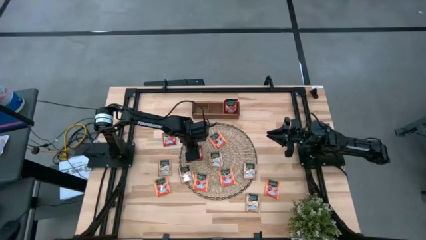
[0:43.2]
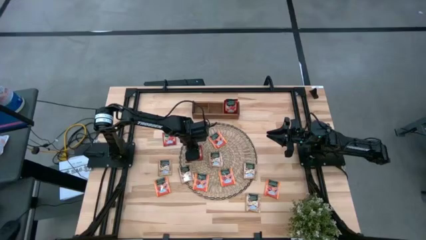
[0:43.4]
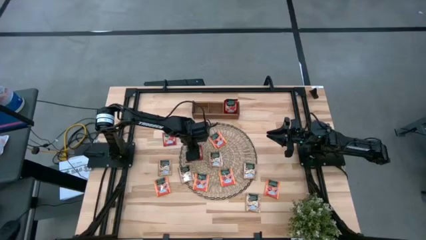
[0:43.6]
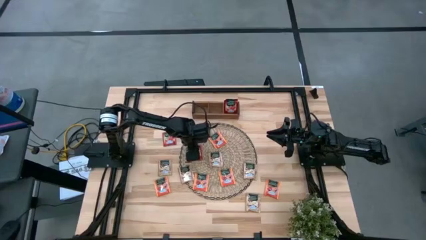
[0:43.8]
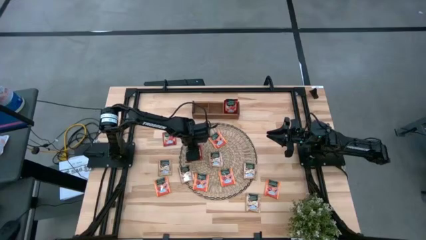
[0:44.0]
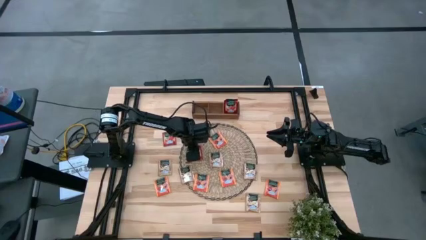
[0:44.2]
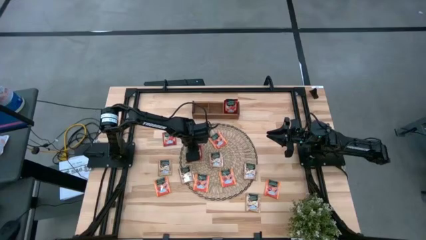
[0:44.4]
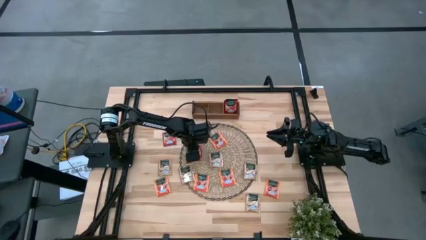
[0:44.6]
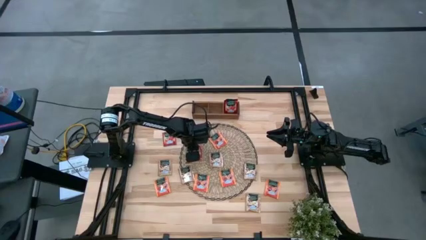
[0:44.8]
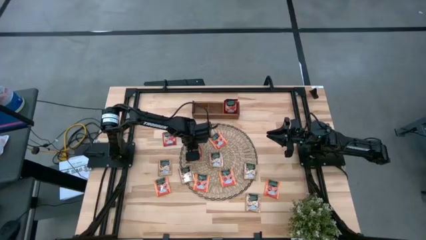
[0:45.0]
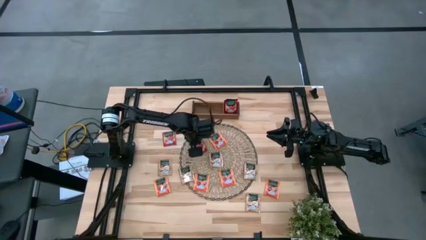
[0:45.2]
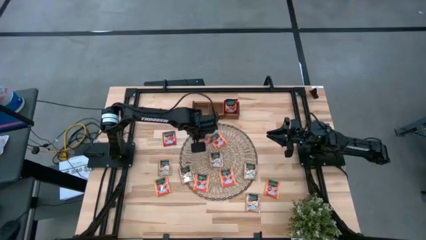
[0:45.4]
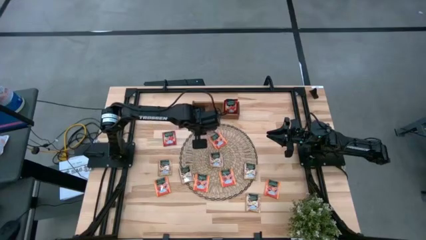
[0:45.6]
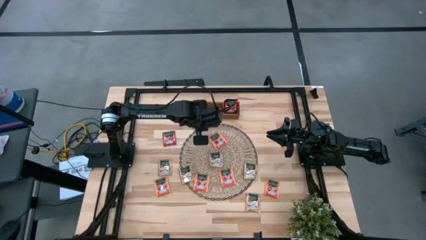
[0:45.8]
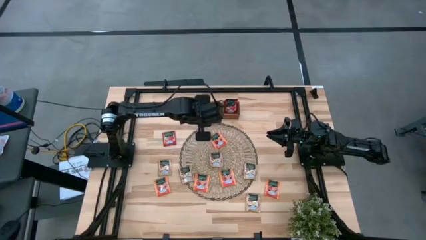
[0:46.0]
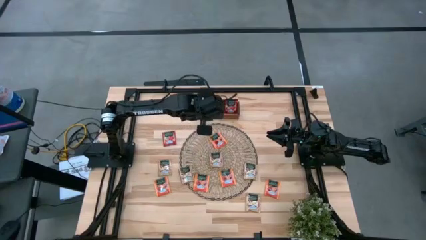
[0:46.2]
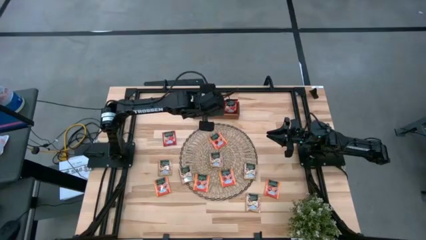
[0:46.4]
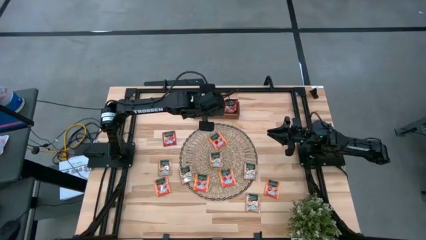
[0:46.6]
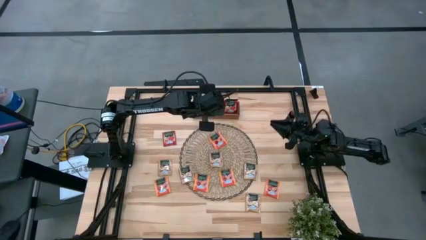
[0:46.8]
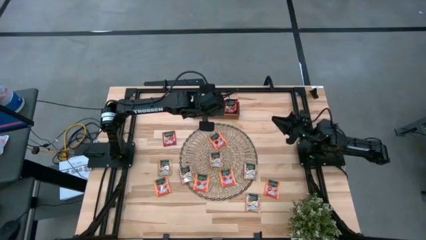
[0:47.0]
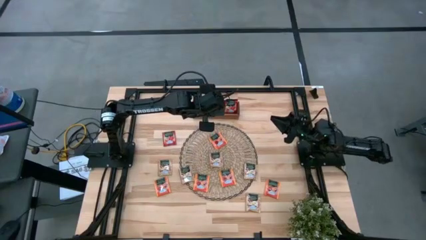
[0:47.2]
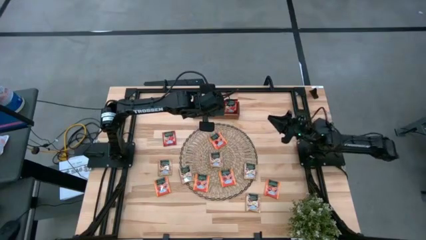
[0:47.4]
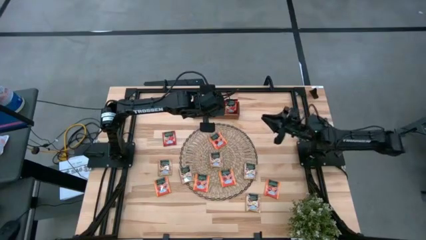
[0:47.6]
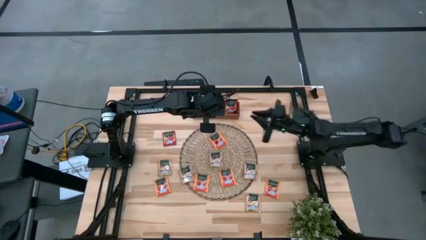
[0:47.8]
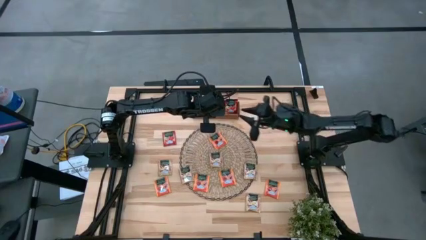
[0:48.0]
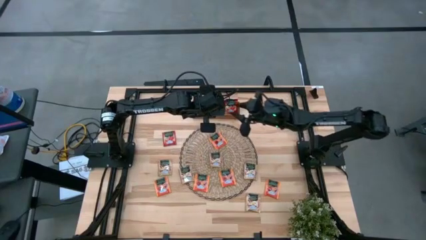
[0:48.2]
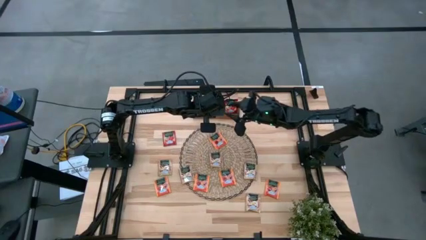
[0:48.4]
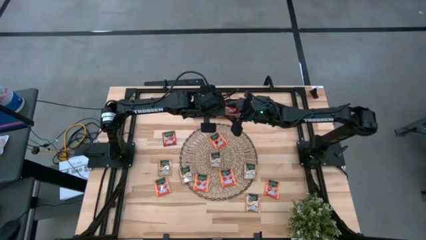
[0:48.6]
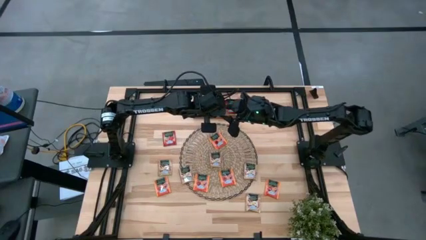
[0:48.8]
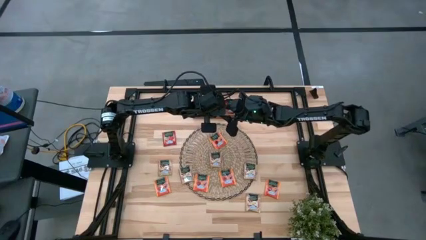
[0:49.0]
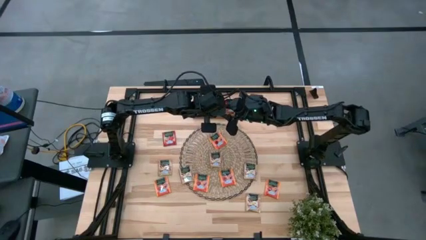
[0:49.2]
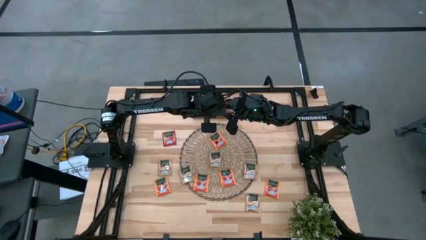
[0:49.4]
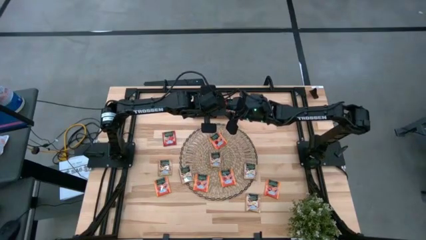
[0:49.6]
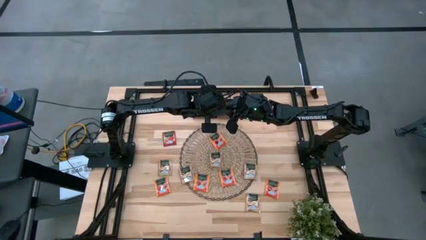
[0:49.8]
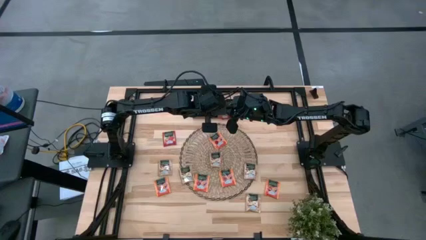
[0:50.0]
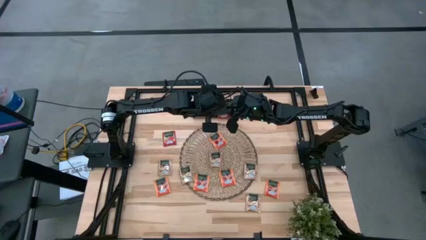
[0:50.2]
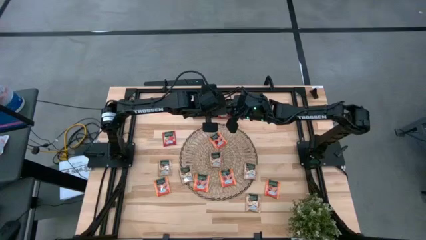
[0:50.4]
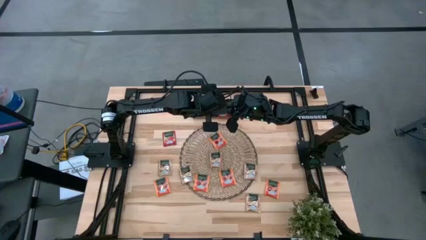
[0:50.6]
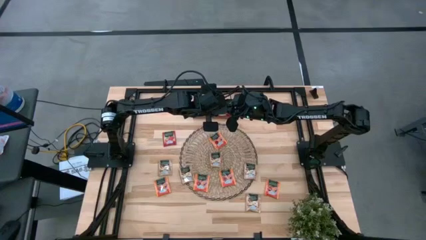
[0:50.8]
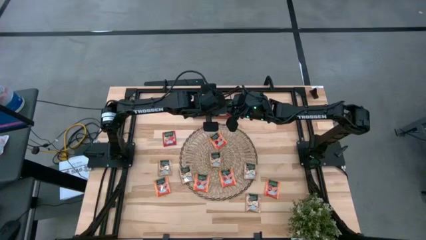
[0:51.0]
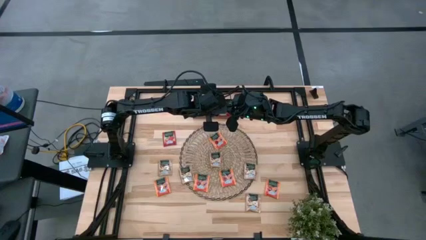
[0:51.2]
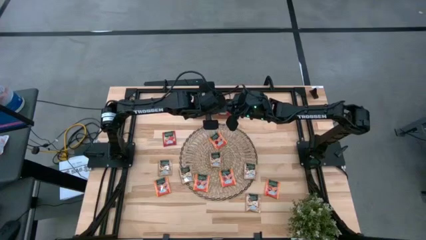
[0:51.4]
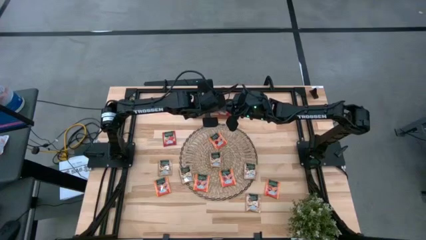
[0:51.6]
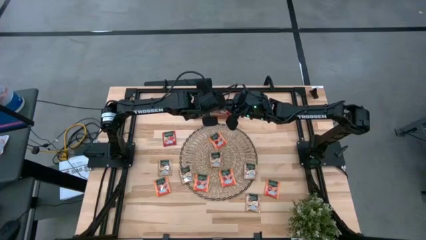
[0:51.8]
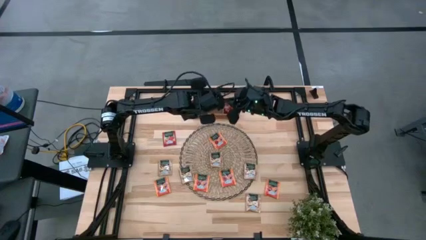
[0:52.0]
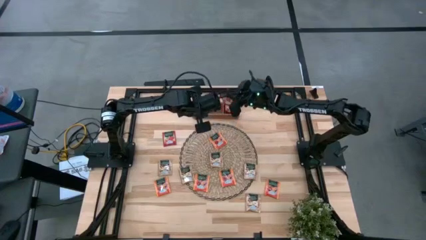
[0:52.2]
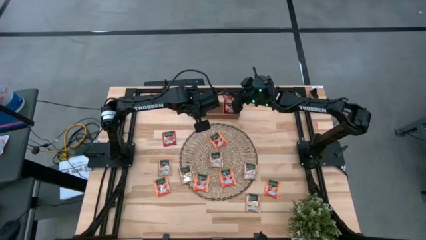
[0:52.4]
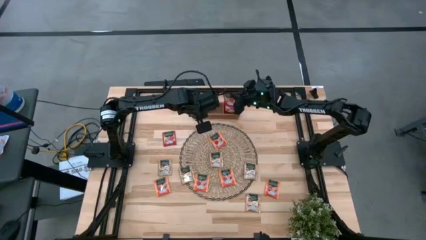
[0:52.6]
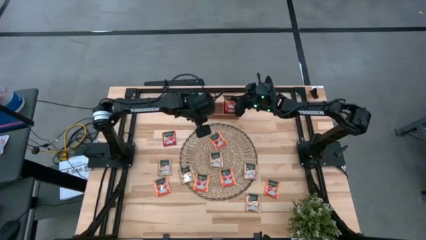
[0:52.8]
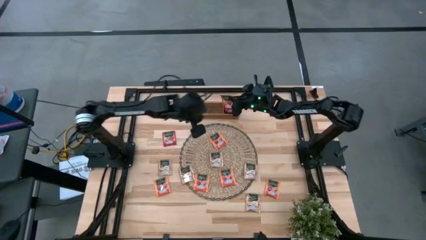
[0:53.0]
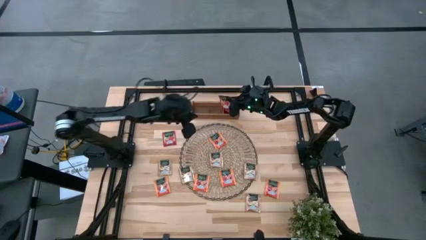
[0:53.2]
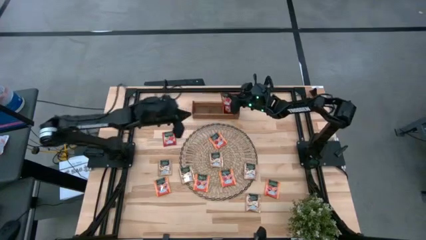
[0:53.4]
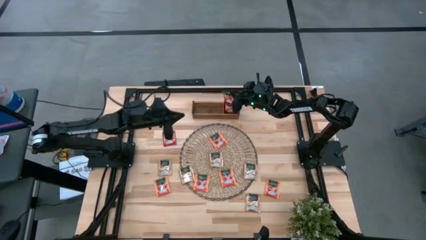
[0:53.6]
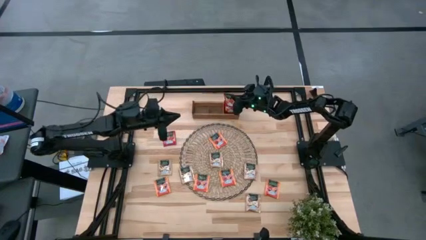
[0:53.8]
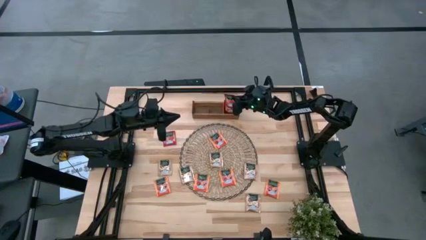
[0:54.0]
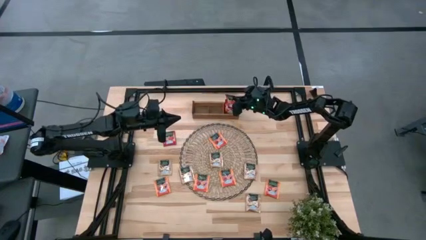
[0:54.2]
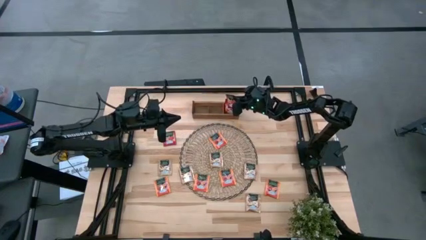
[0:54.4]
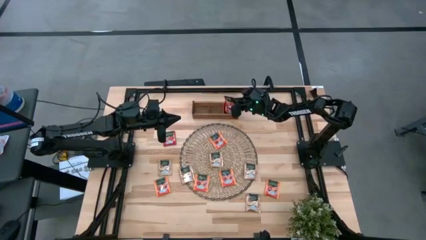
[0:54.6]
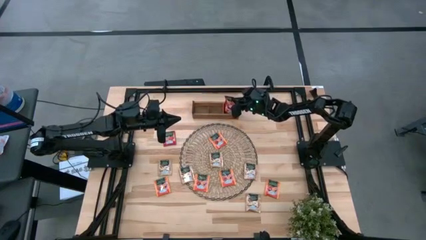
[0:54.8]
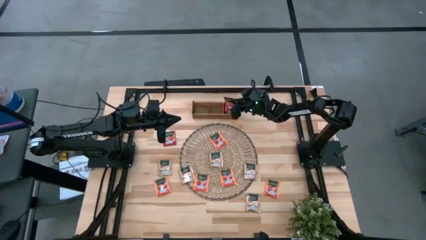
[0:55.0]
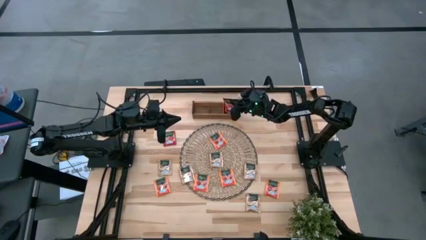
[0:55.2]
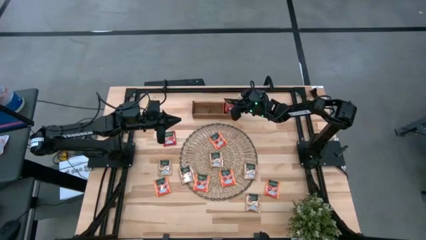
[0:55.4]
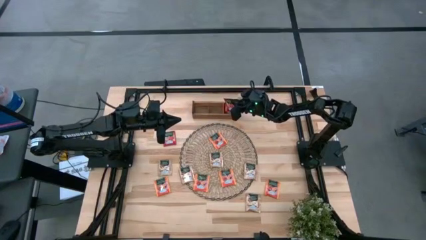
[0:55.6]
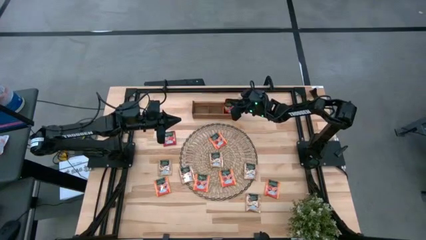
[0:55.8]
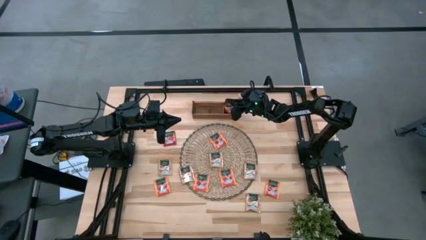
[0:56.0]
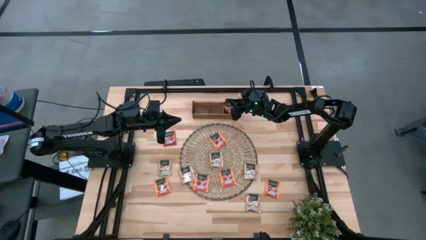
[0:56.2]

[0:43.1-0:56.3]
Task: Pick & Place Tea
Put the red tea bag into the right section of the wooden organizer
